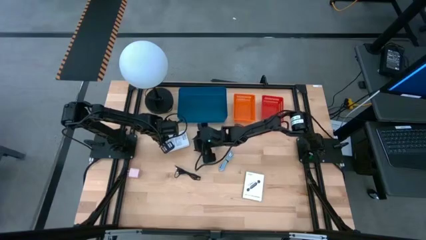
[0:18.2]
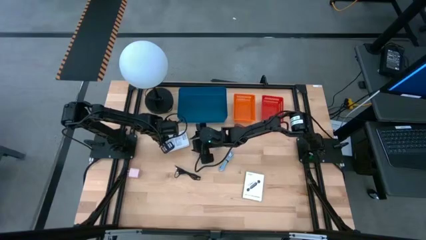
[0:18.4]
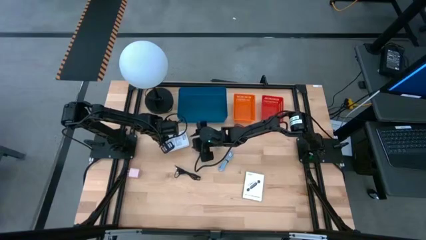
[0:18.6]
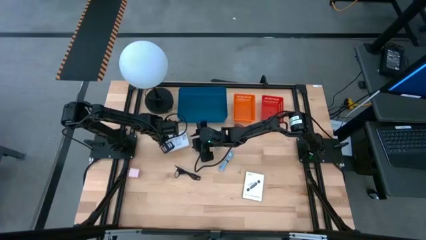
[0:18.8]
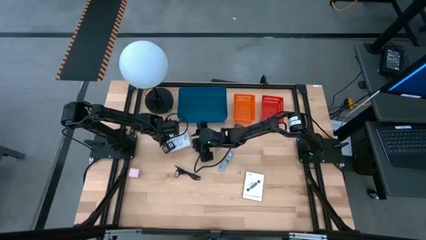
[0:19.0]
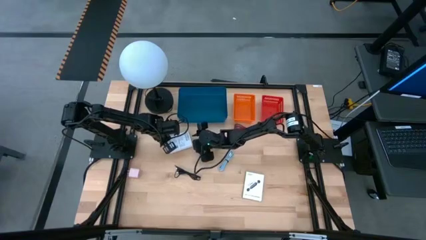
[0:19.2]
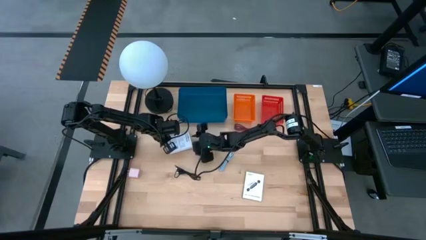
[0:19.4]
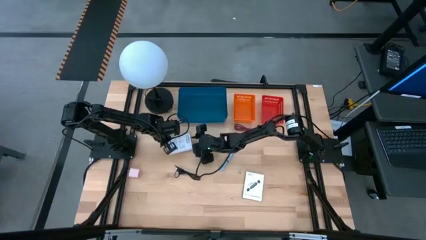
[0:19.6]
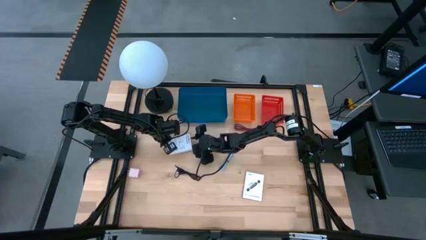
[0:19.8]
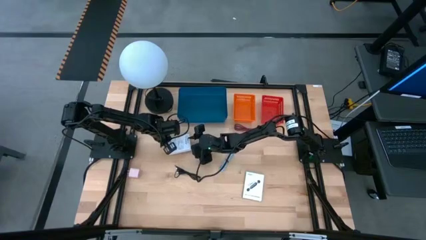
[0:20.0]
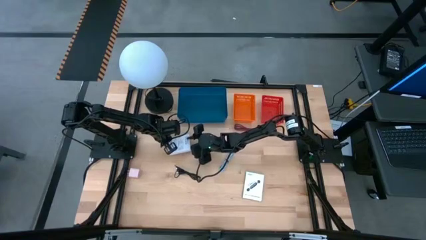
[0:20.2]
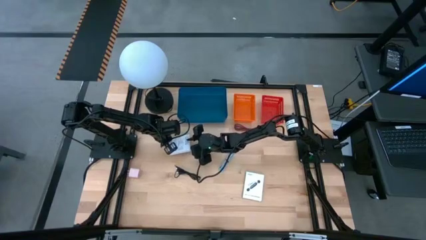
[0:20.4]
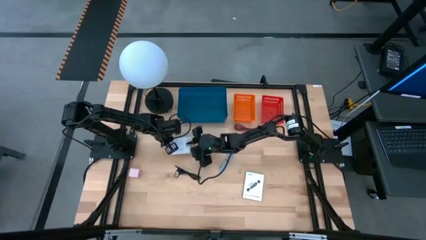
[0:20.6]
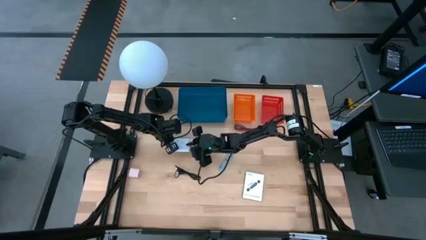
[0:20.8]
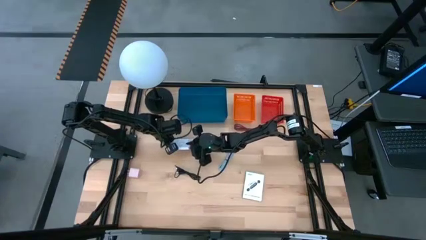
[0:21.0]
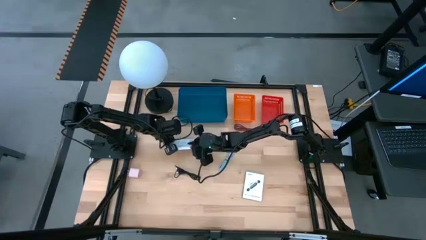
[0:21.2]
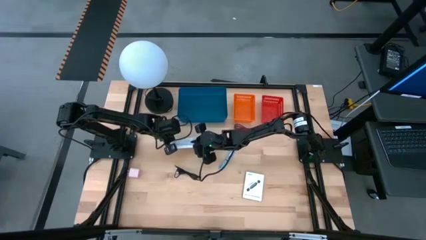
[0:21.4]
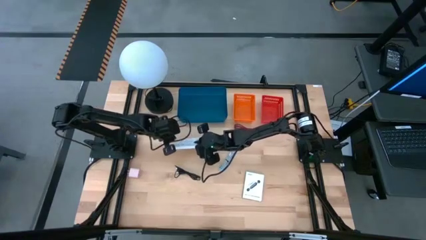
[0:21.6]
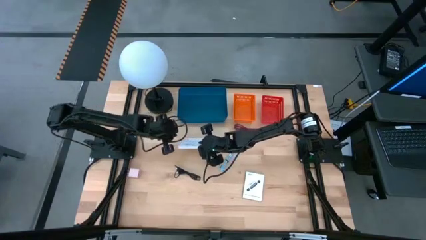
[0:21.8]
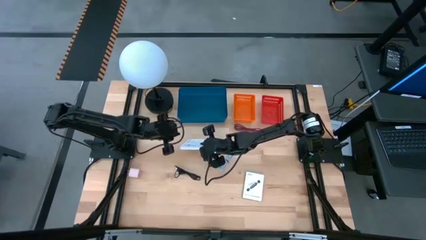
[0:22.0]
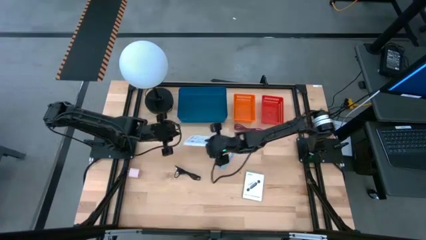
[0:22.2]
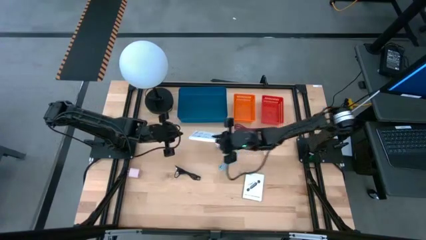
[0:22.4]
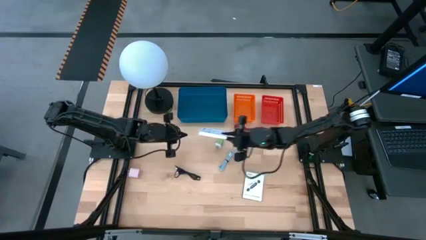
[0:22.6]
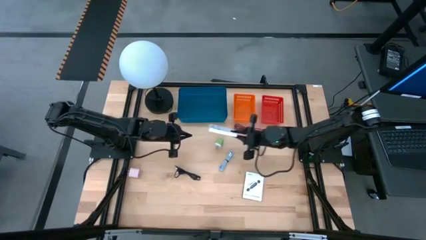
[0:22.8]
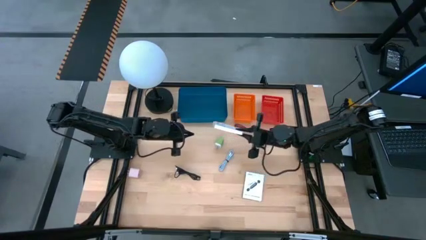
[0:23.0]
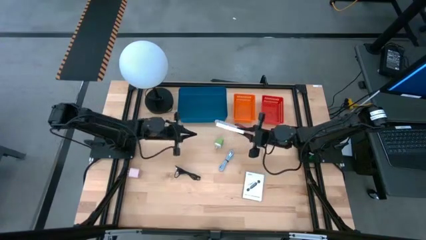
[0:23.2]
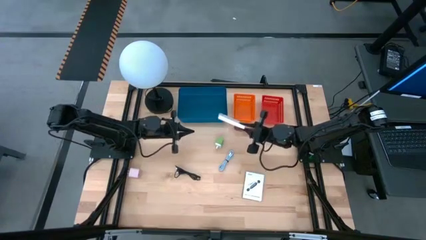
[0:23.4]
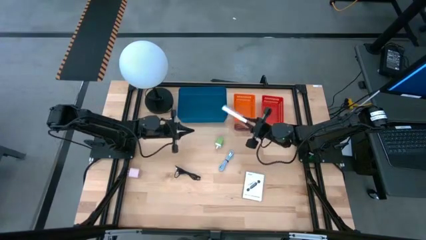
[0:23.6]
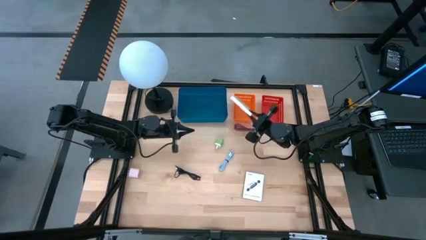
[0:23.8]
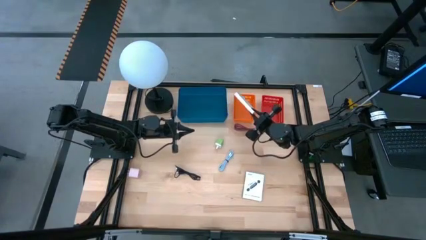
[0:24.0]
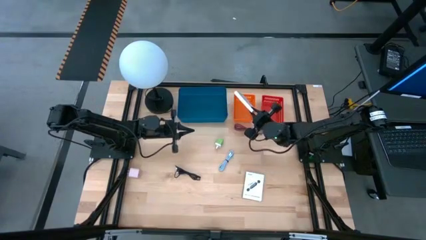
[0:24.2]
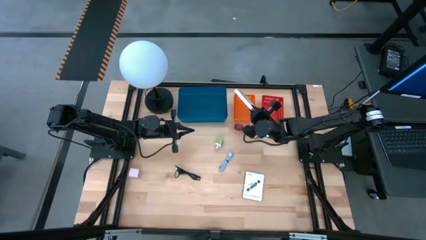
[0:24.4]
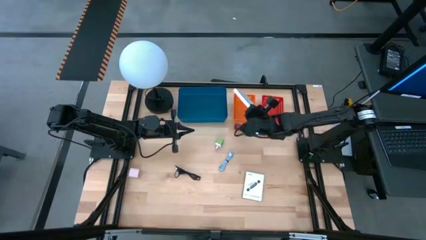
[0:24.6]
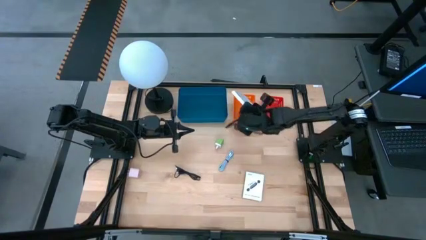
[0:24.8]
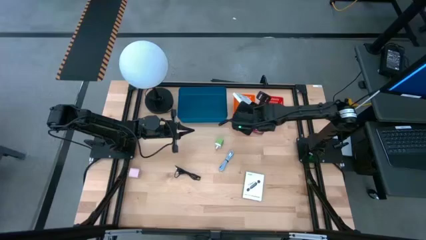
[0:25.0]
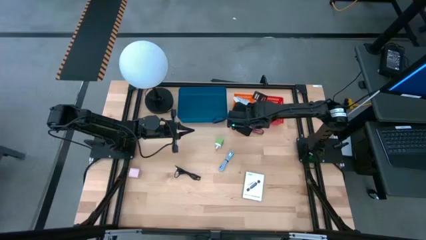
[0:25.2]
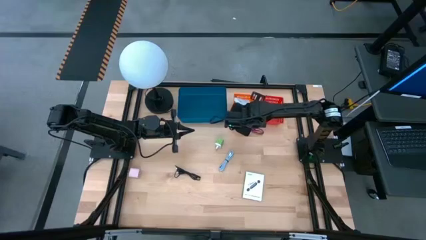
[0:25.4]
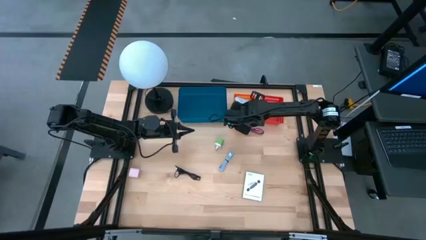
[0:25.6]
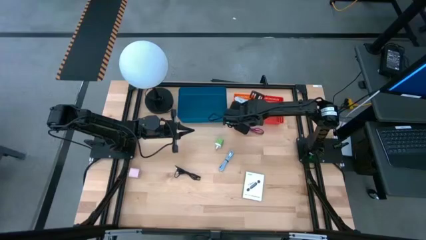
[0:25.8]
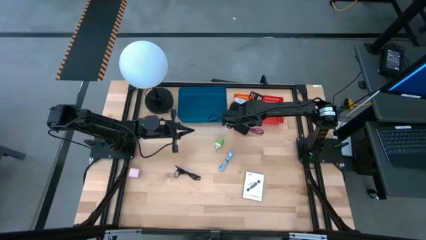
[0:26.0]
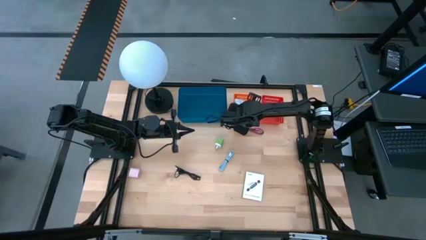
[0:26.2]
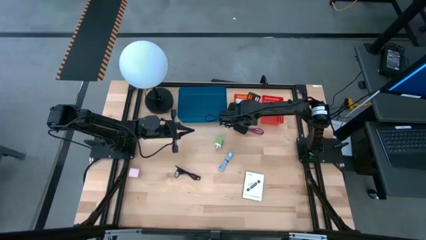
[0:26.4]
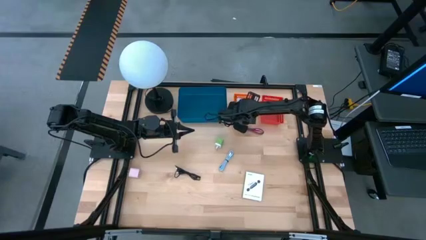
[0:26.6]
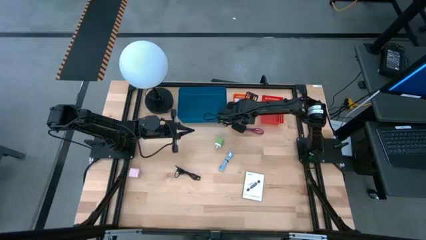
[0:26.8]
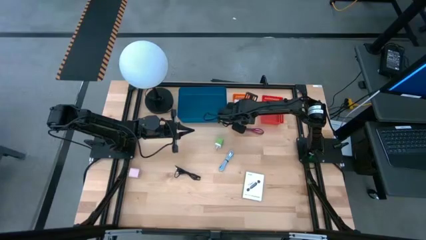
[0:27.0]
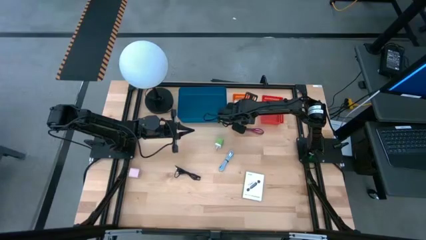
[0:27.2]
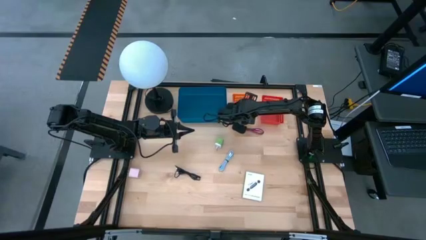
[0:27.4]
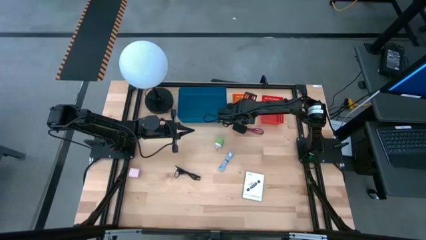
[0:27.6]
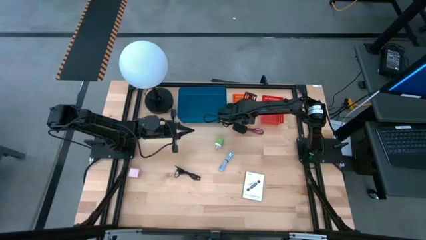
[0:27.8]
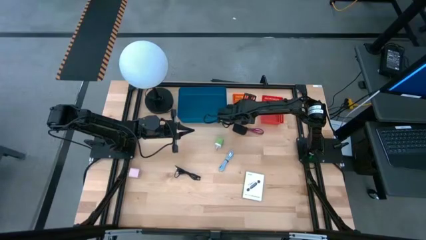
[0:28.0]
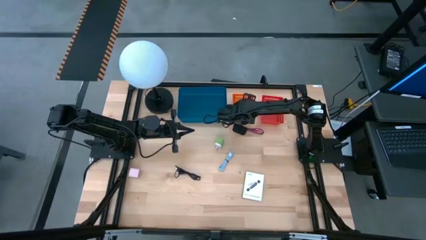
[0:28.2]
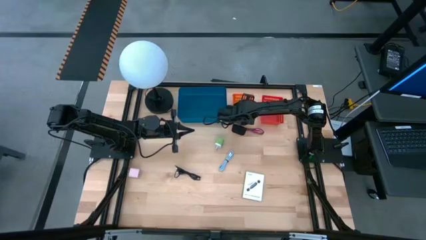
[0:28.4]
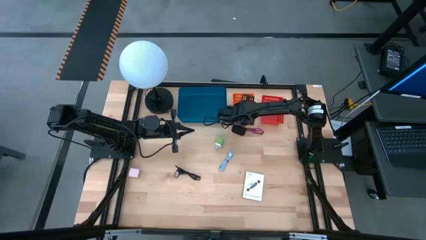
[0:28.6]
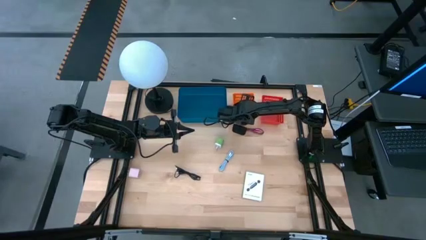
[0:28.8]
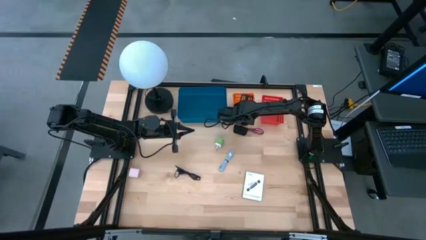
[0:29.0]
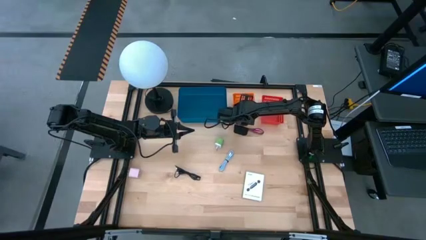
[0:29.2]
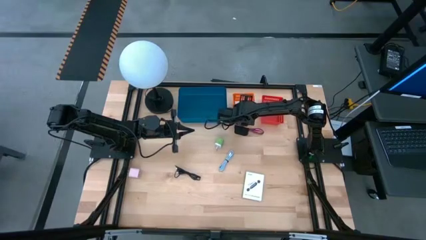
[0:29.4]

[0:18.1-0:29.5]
Task: Pick and place items into bin
Put the left white card reader box into the orange bin

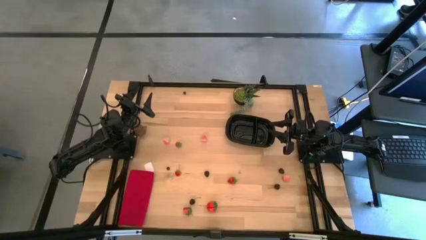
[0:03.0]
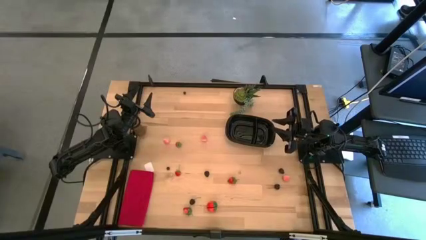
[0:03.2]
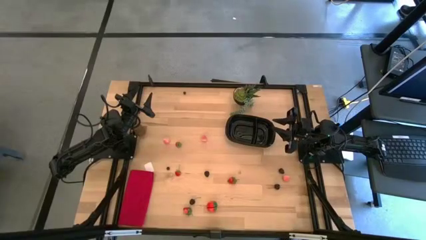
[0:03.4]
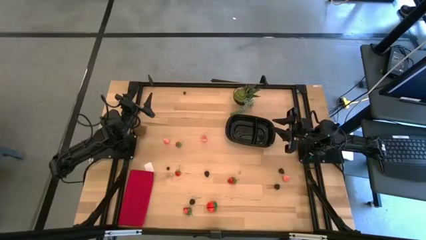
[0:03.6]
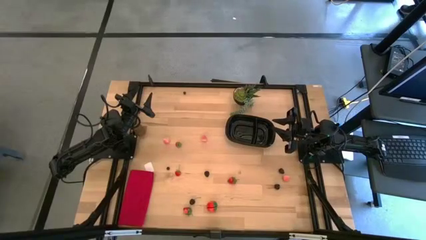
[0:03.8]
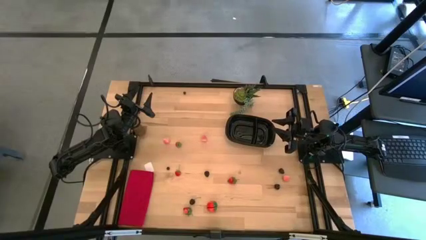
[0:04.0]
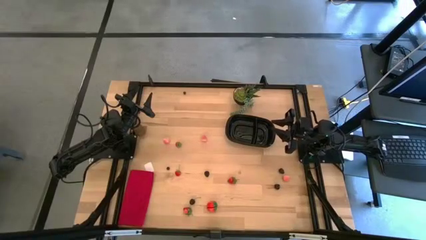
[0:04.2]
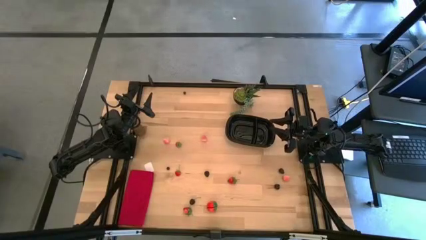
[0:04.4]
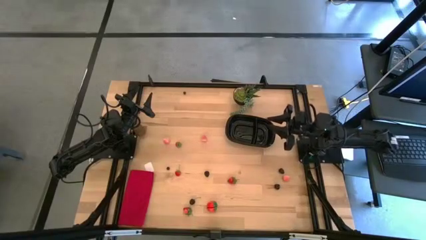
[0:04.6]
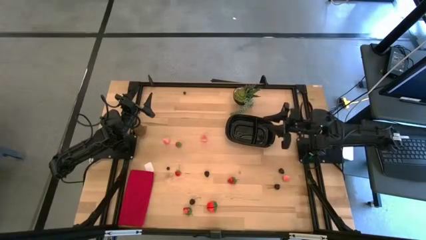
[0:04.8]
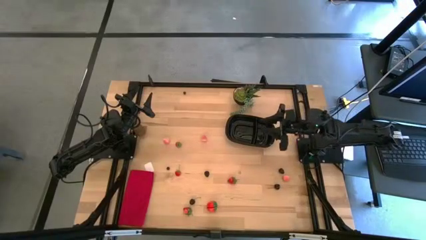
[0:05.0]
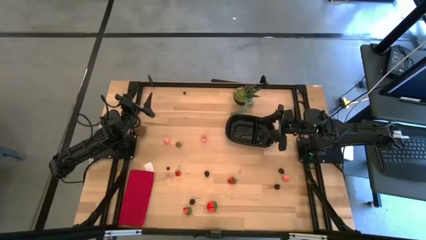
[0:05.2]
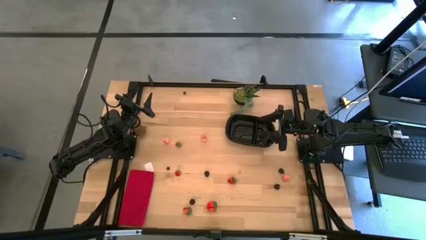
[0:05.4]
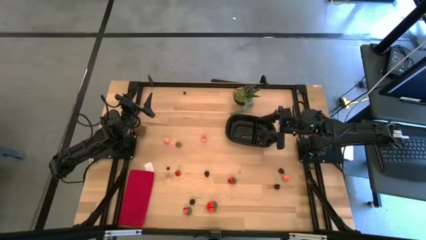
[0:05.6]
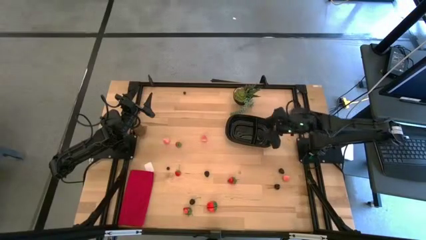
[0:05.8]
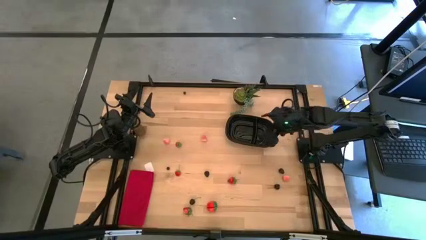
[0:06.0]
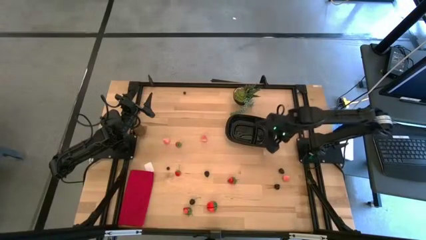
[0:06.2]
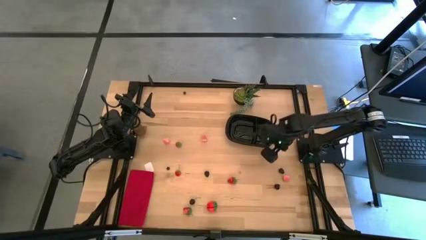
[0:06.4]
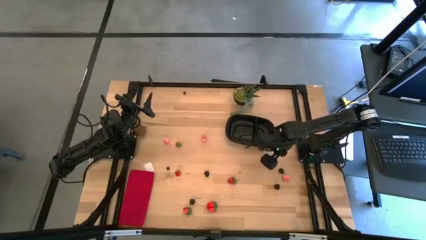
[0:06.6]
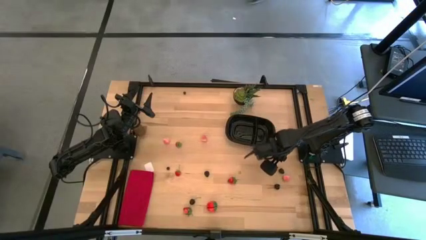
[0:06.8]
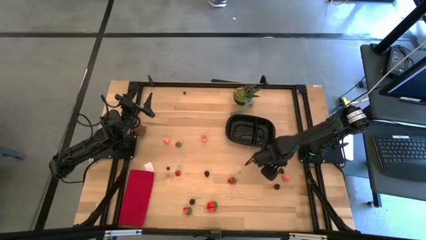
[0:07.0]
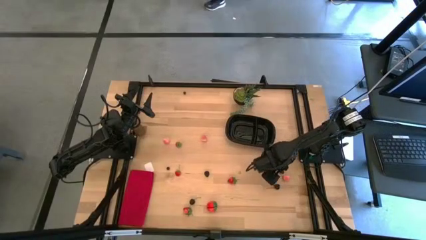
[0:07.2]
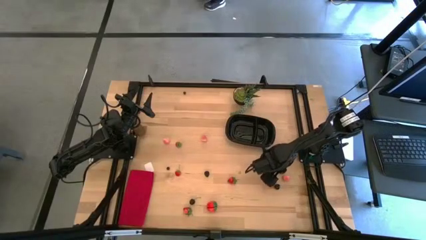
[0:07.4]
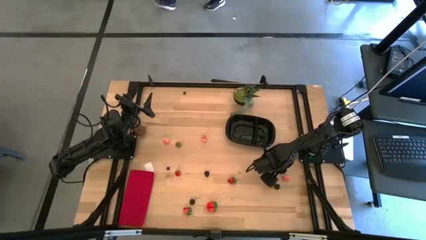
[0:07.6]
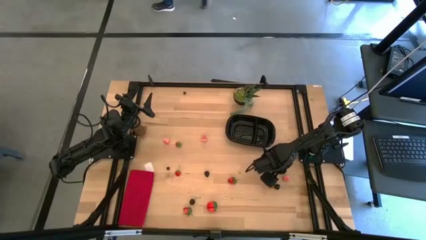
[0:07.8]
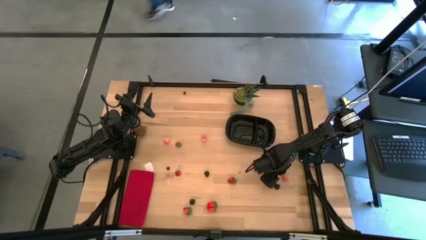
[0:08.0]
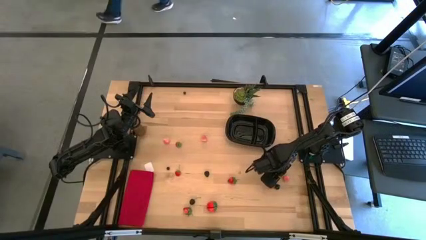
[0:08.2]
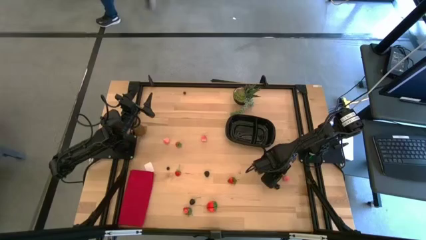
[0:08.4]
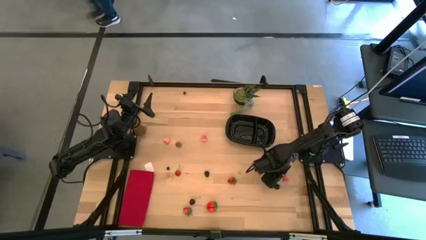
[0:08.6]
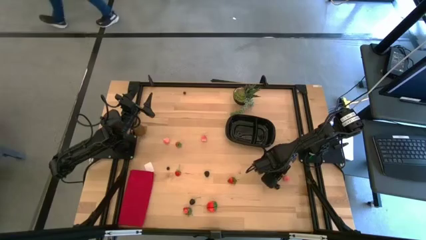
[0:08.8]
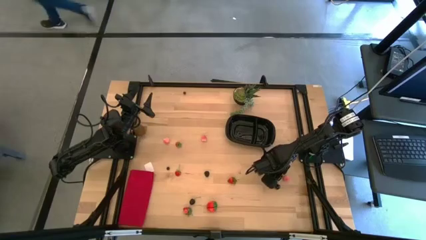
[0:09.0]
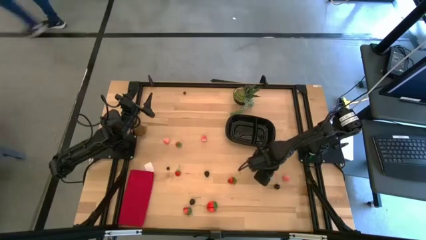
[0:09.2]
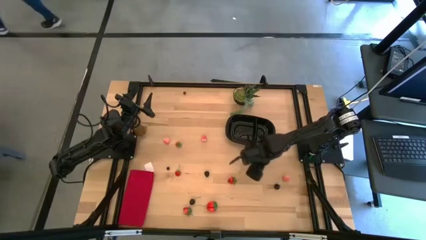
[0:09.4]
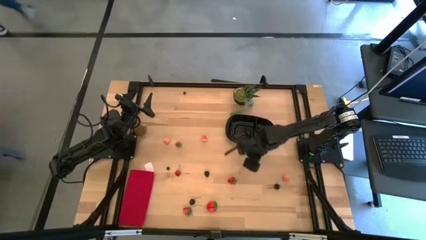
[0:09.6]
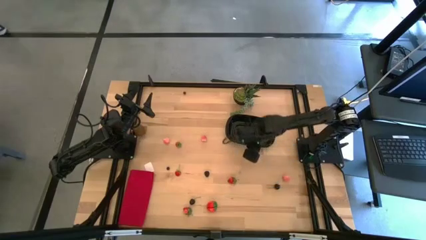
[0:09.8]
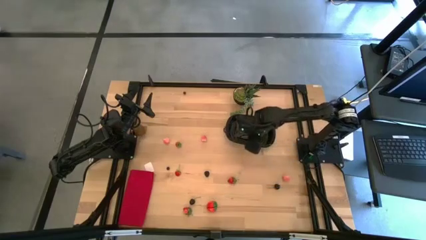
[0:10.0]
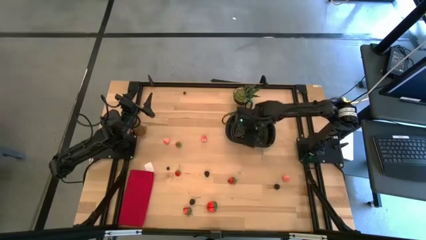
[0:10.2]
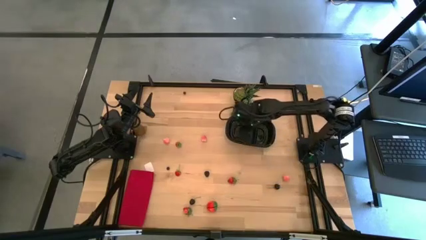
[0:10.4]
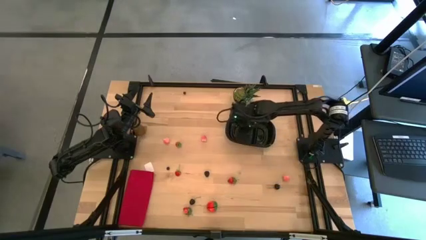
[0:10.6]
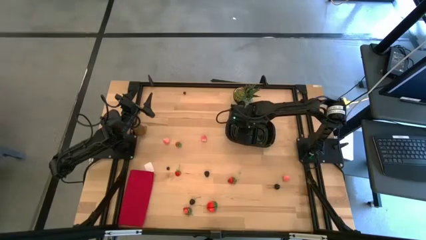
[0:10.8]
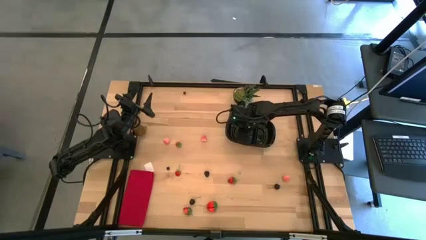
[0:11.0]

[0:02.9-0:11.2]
Task: Pick and placing Produce into tupperware
Put the blackberry into the of the black bin
